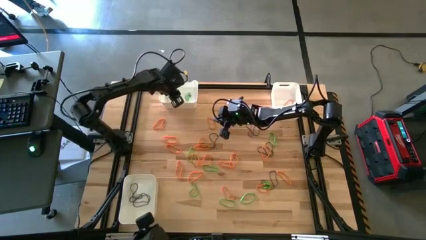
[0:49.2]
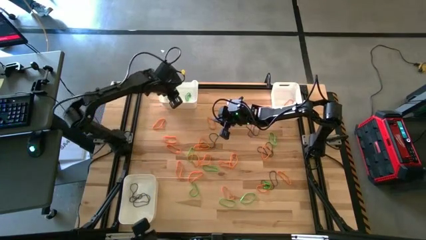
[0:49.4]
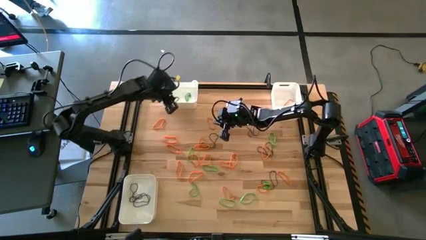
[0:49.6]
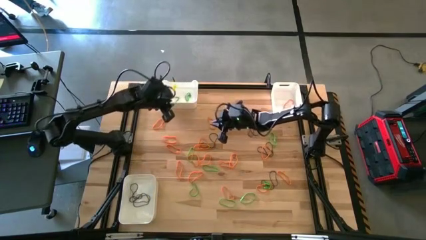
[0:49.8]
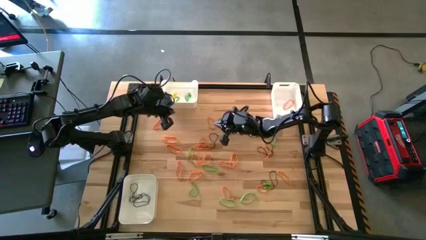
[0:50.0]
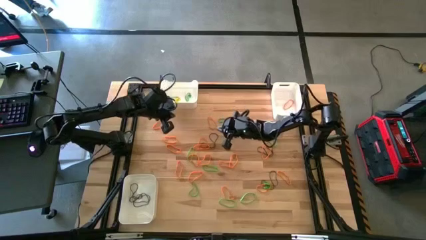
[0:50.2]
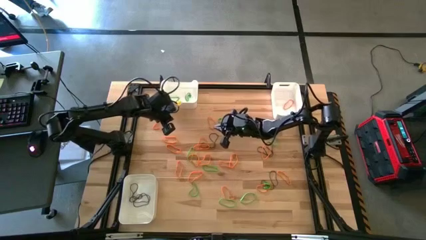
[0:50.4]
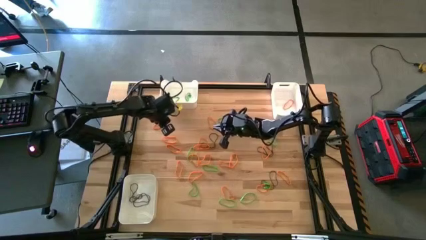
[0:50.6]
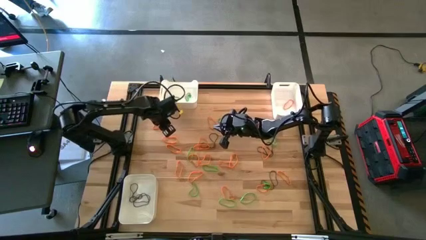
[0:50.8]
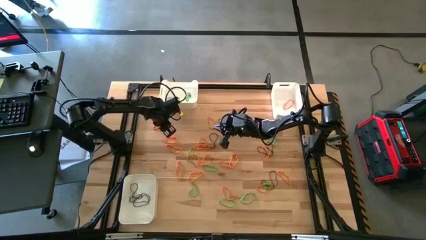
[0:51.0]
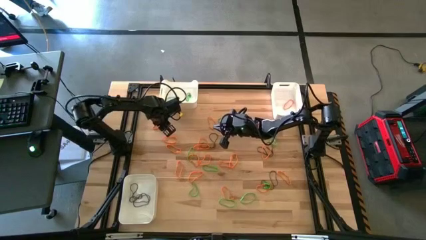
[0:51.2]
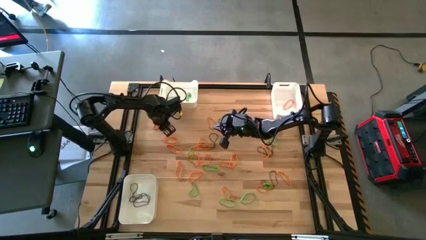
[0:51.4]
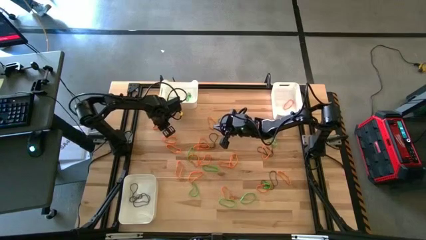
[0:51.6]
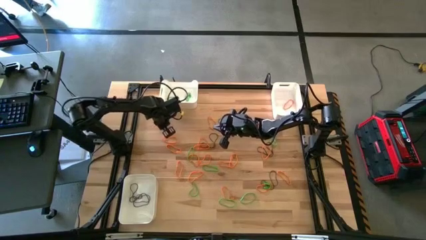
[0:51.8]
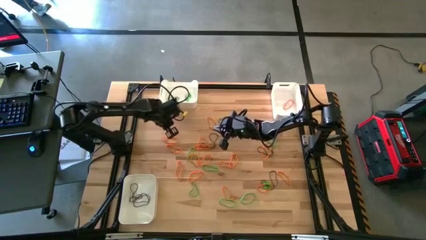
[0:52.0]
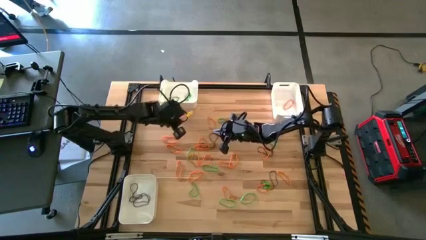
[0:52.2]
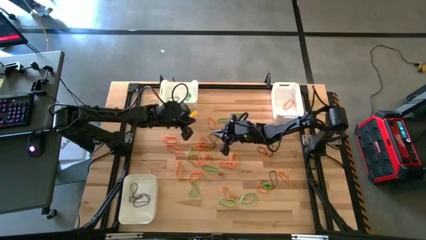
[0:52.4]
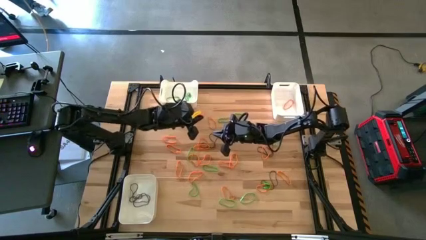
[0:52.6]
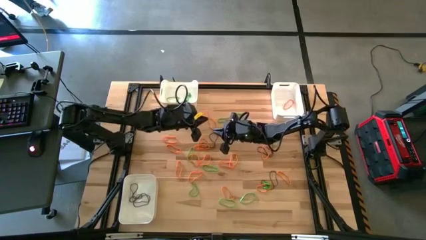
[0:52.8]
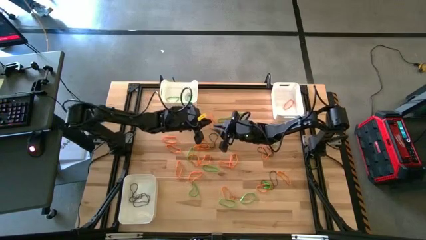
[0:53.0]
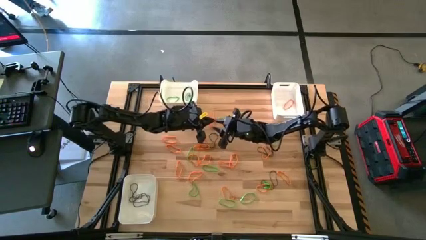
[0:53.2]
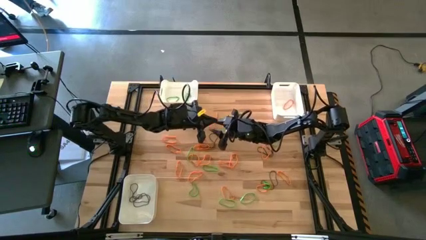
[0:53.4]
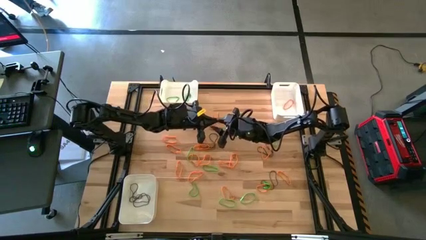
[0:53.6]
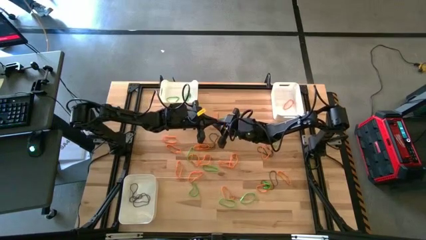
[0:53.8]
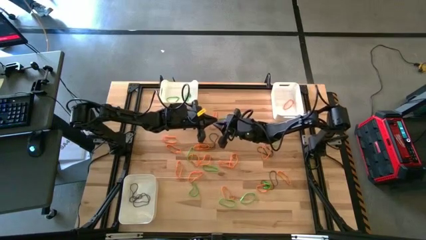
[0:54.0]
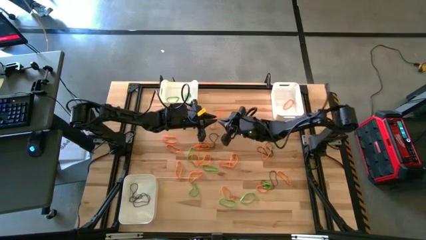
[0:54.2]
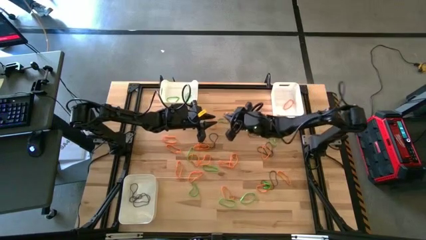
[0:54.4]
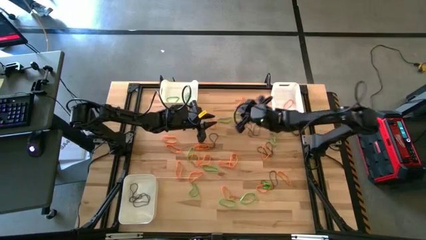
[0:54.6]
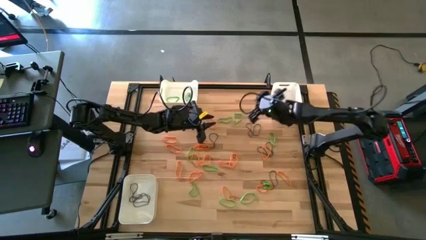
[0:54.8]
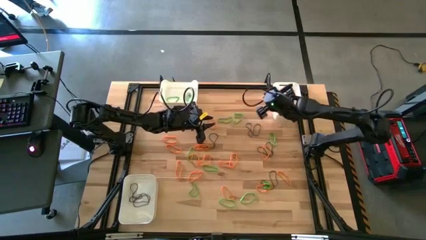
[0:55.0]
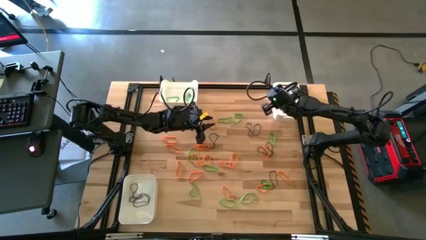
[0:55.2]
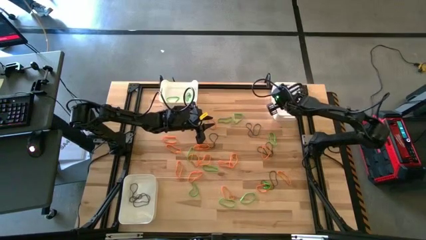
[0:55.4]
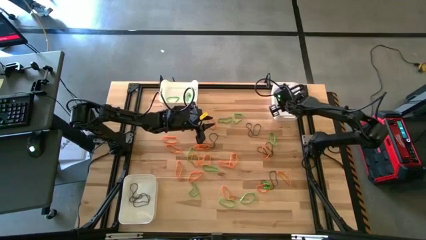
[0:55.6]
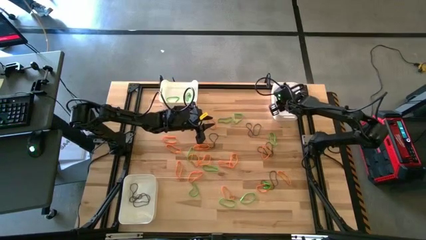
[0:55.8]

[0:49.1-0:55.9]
Task: Sort rubber bands into baskets
Put the orange rubber band into the top right white bin

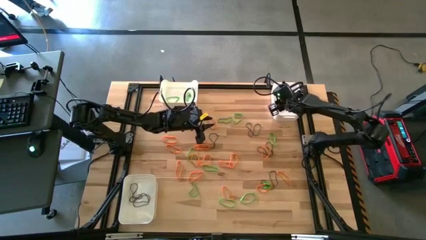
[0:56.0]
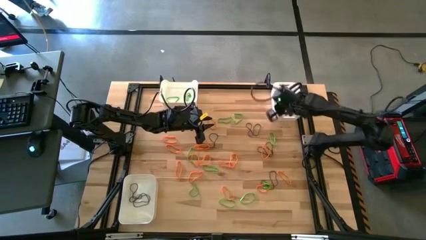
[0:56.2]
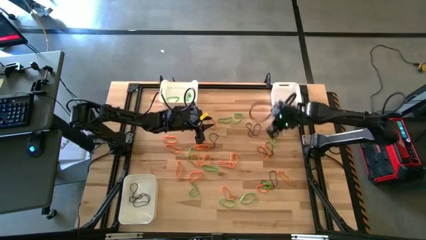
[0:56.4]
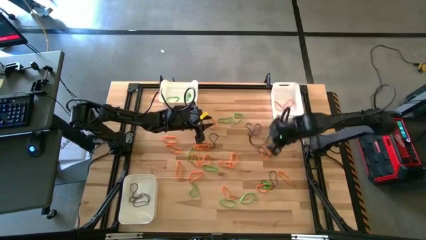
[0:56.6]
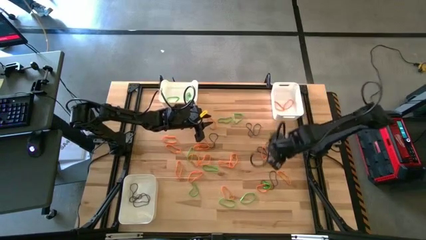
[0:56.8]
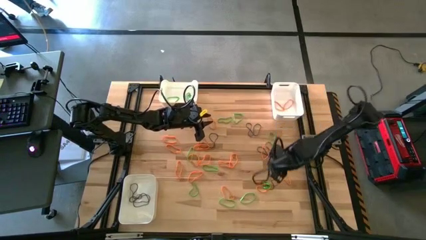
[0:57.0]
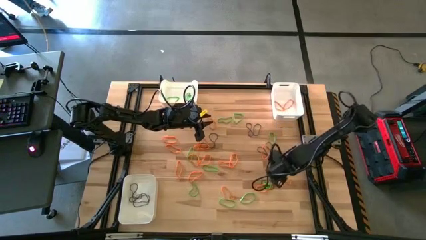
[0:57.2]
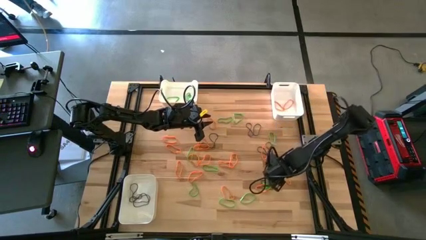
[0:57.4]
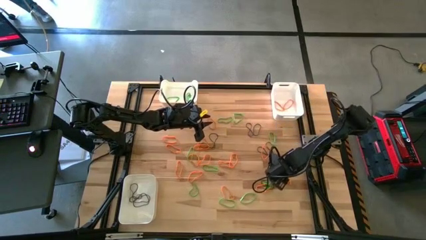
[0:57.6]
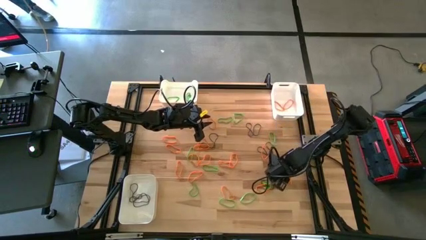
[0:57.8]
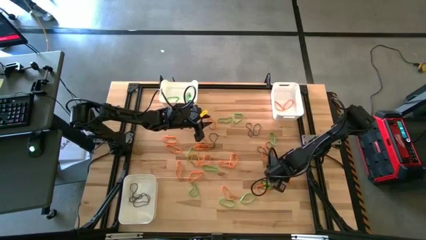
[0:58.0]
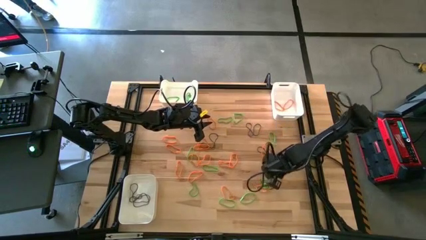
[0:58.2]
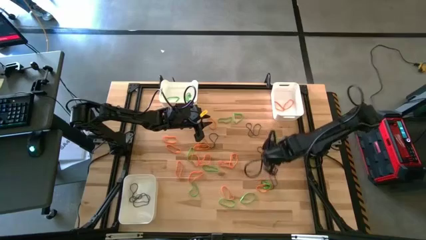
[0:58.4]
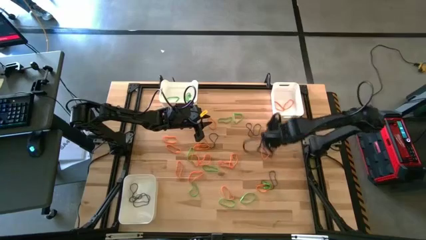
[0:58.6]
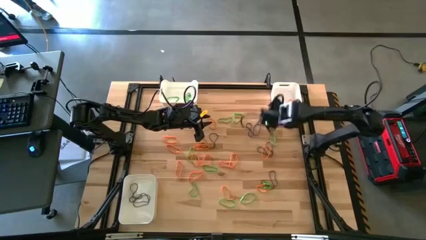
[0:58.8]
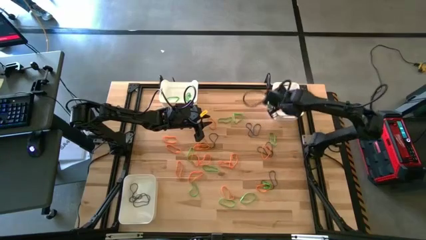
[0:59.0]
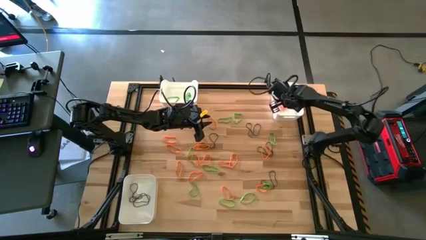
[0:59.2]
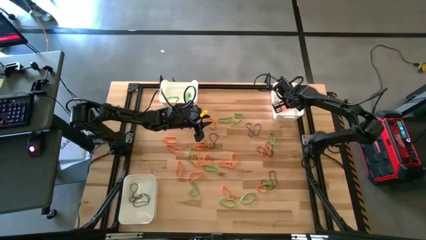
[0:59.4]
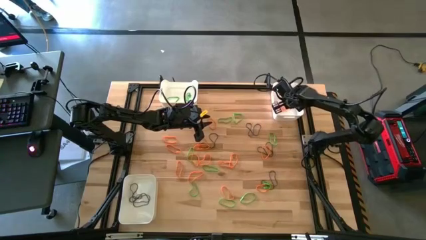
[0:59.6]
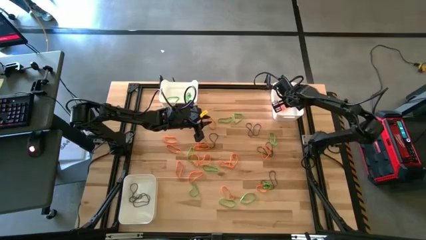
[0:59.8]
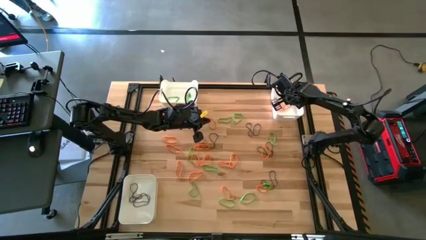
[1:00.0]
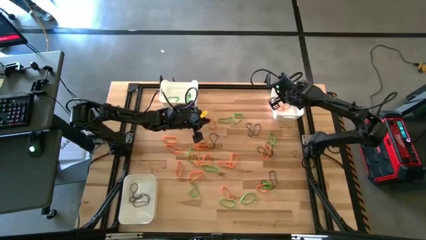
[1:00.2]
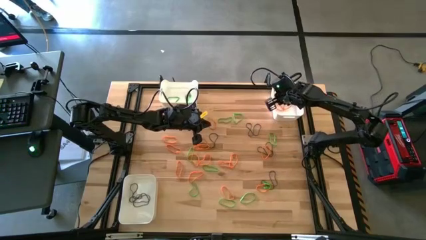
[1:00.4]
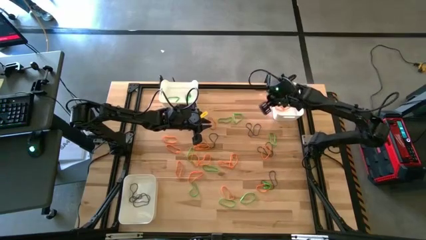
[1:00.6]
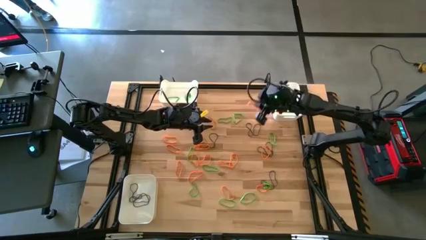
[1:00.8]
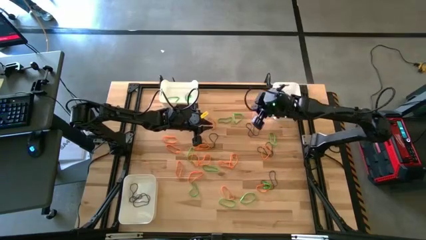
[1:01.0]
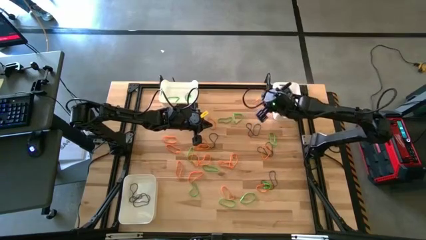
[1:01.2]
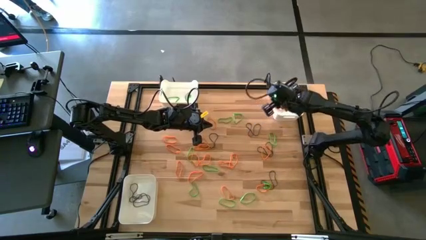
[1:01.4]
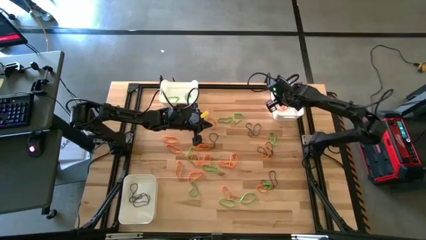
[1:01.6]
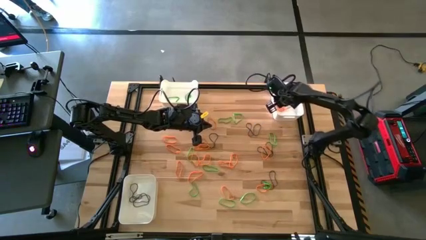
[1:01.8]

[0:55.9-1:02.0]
Put the orange rubber band into the top right white bin

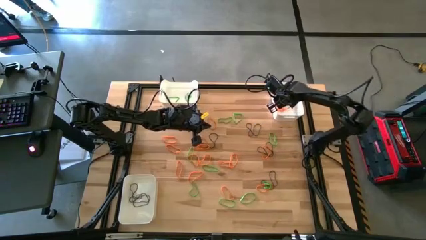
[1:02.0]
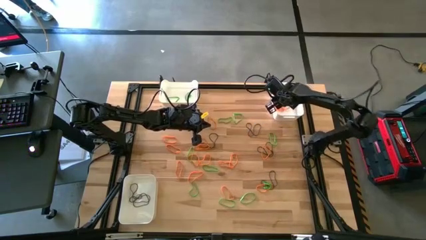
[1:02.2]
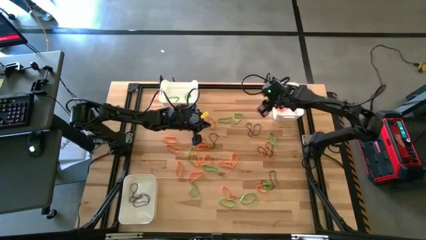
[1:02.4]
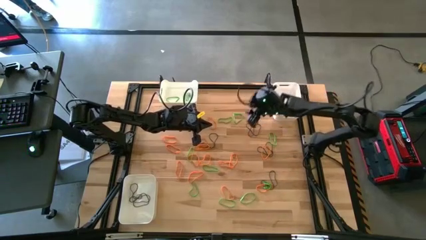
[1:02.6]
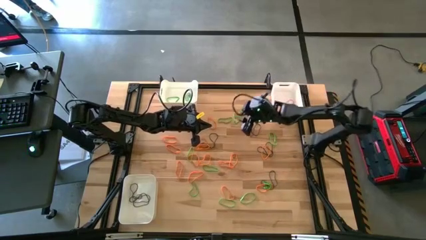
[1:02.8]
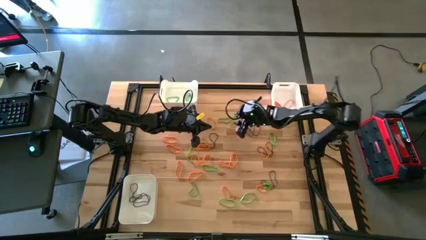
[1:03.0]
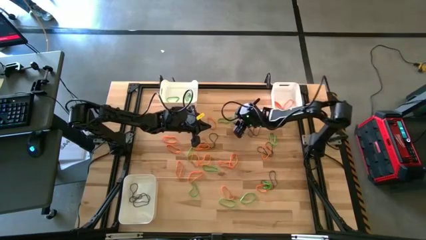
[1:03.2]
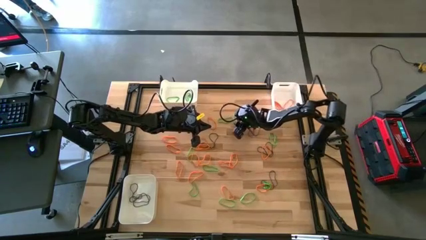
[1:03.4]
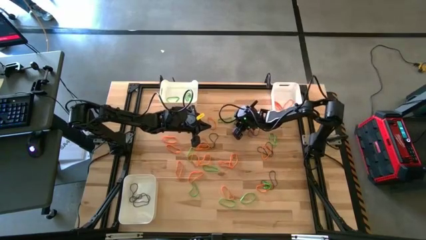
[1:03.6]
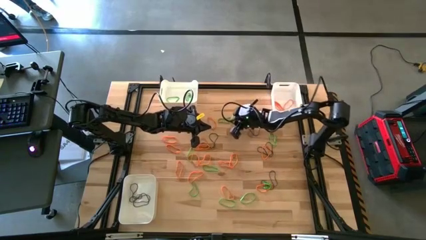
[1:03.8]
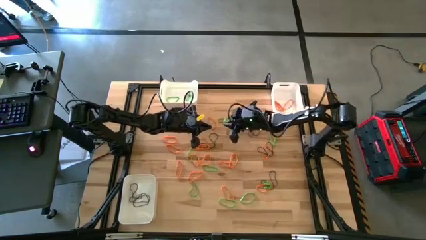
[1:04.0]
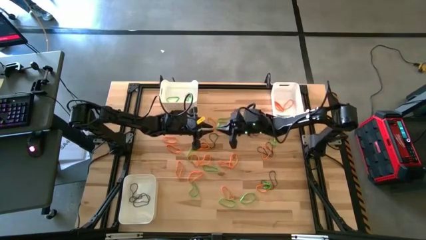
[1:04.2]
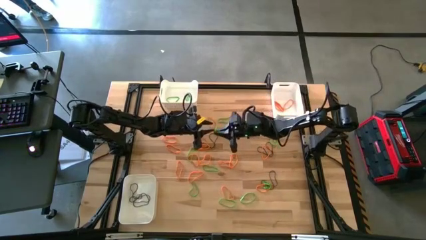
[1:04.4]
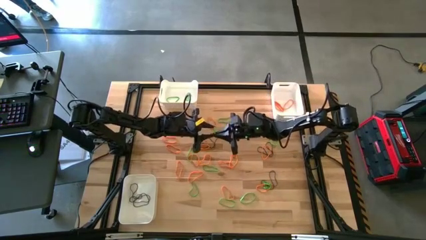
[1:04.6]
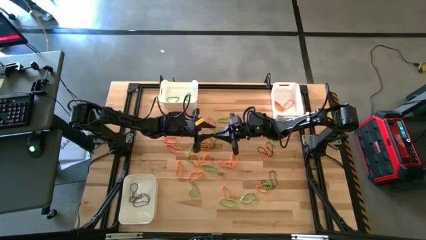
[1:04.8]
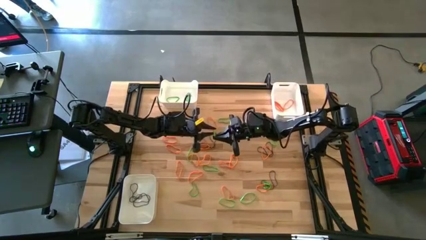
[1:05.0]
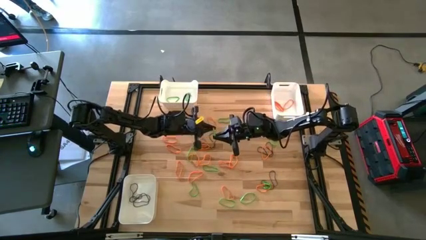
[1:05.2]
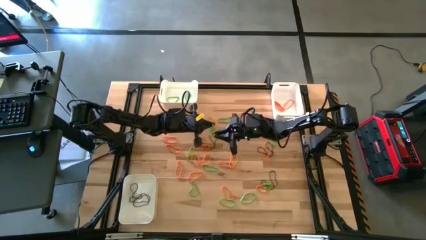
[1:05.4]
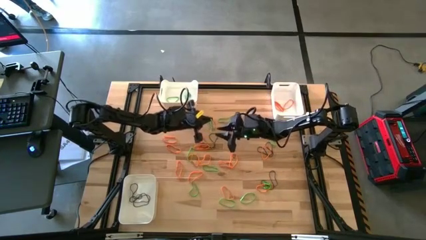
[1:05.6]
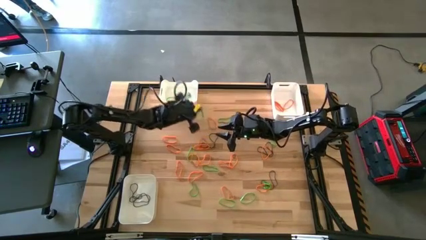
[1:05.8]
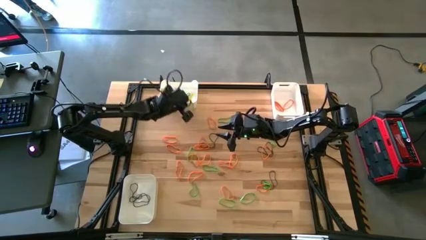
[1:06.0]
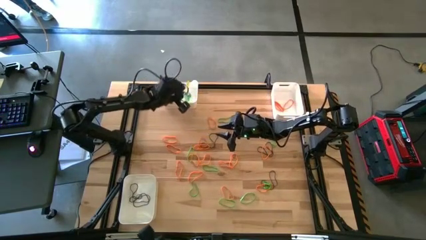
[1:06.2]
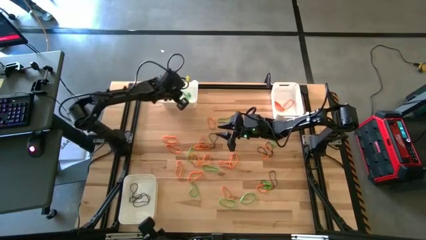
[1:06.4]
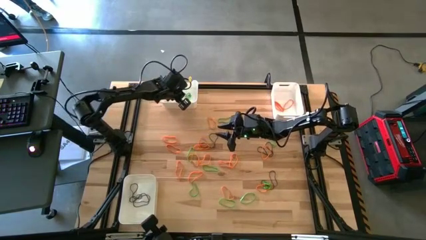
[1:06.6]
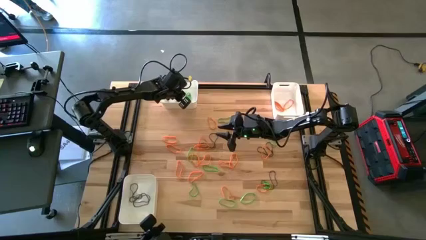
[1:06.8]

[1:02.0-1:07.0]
Put the green rubber band into the top left white bin
